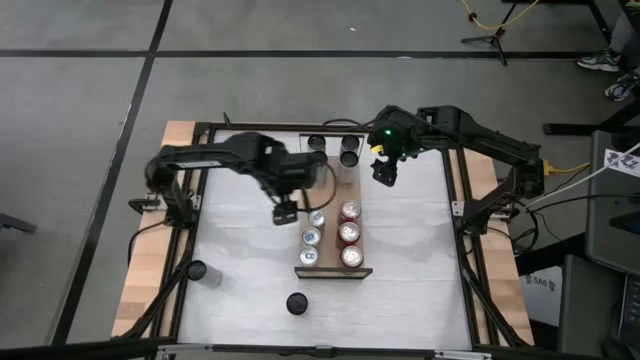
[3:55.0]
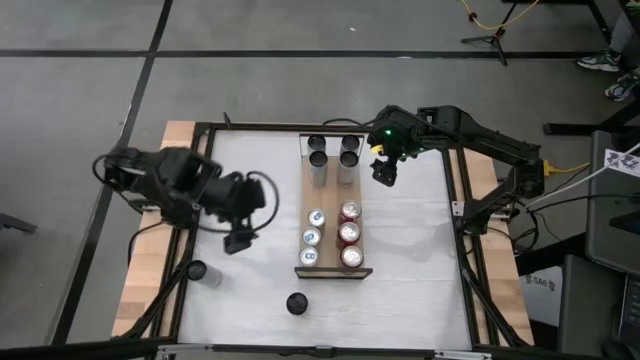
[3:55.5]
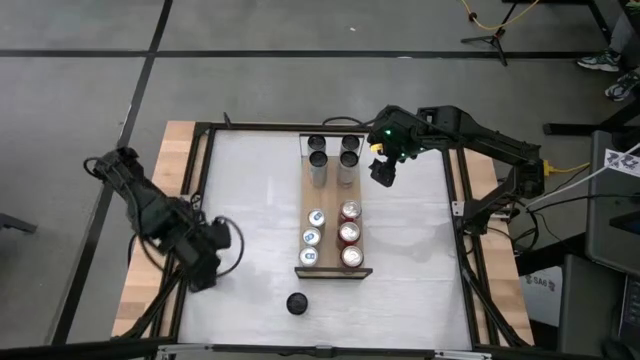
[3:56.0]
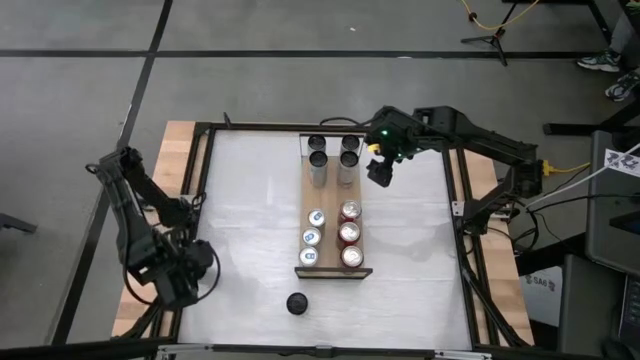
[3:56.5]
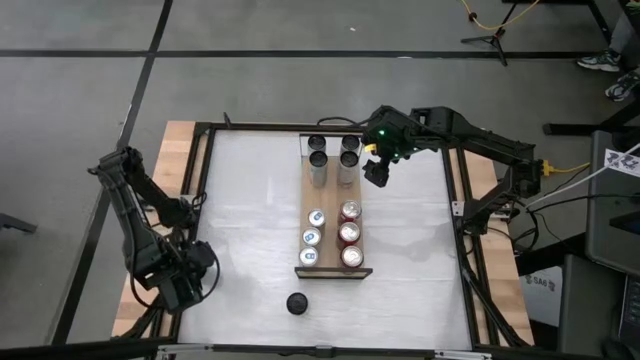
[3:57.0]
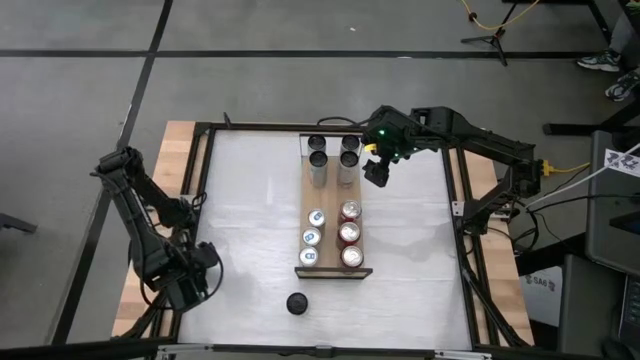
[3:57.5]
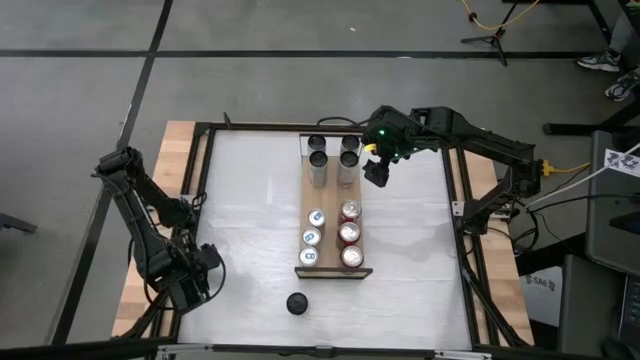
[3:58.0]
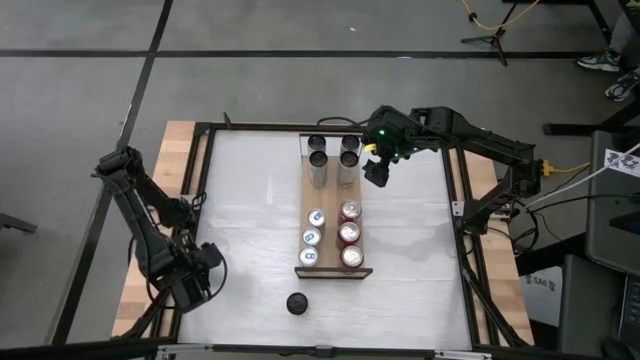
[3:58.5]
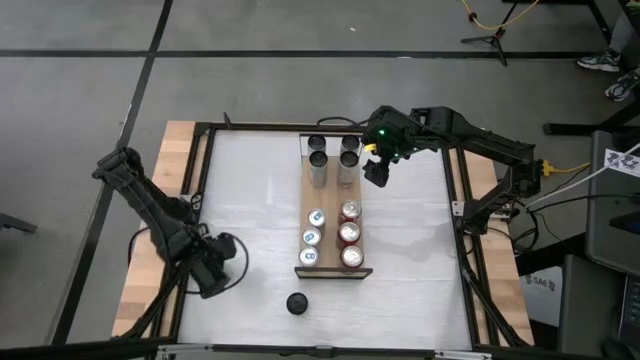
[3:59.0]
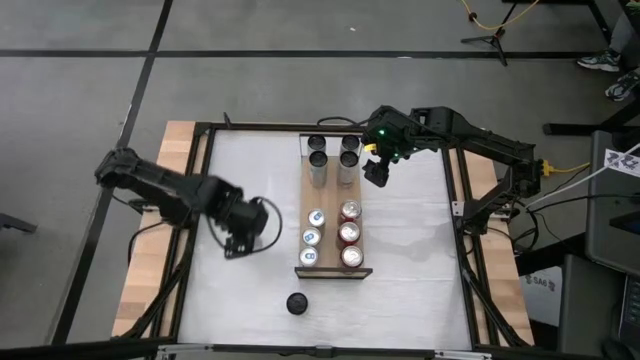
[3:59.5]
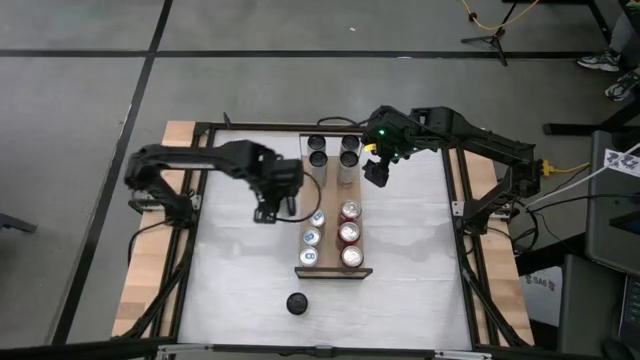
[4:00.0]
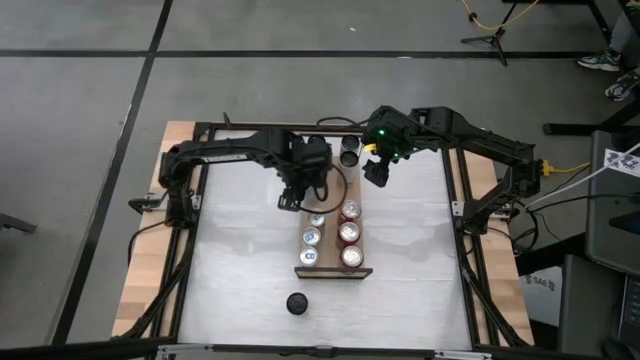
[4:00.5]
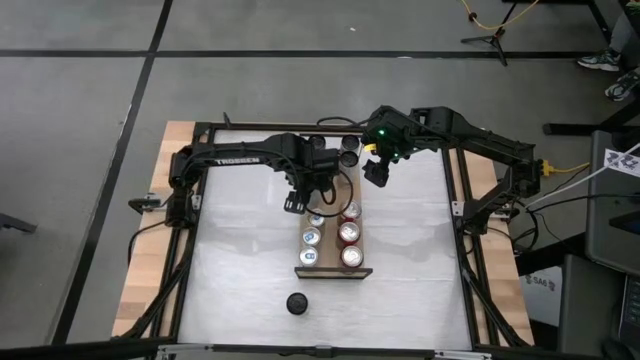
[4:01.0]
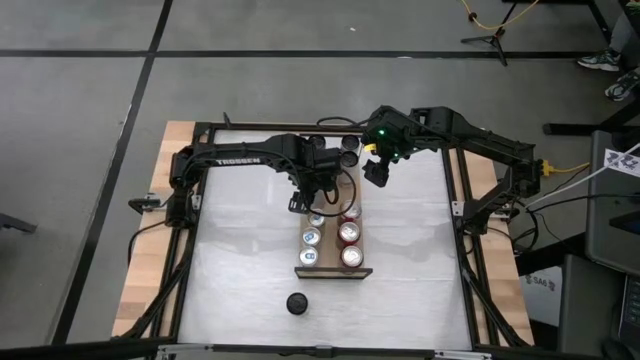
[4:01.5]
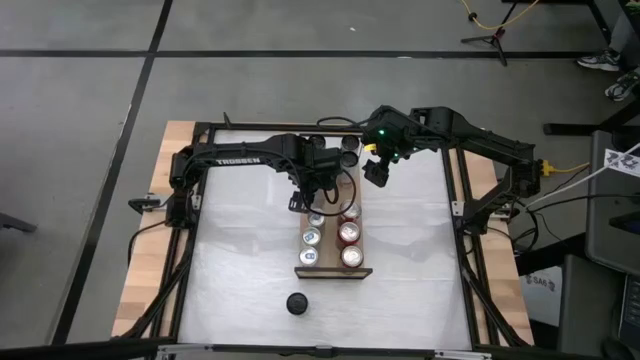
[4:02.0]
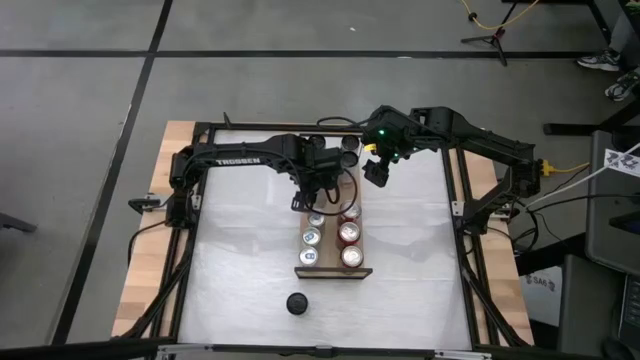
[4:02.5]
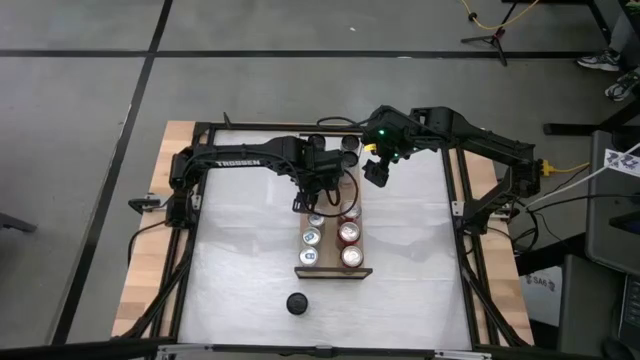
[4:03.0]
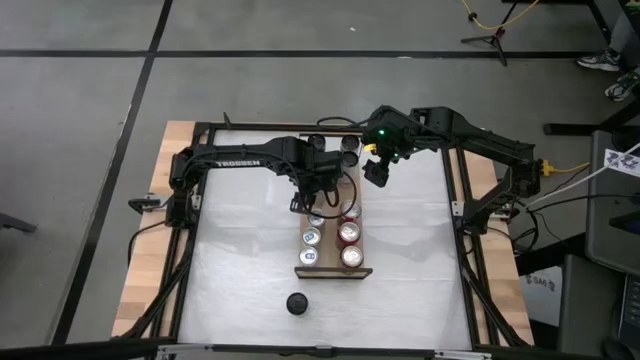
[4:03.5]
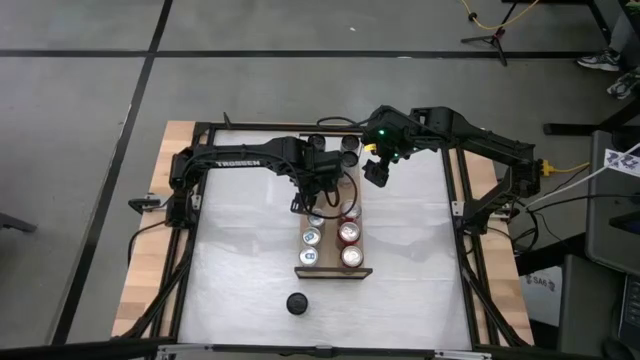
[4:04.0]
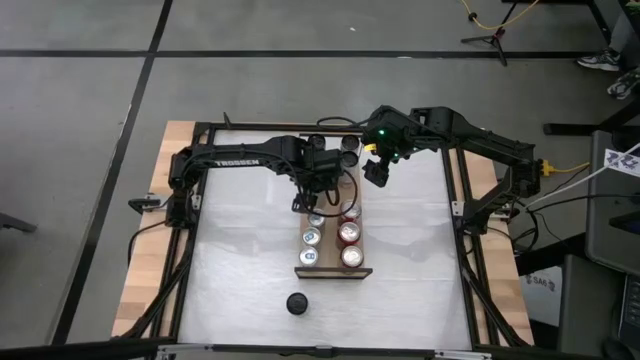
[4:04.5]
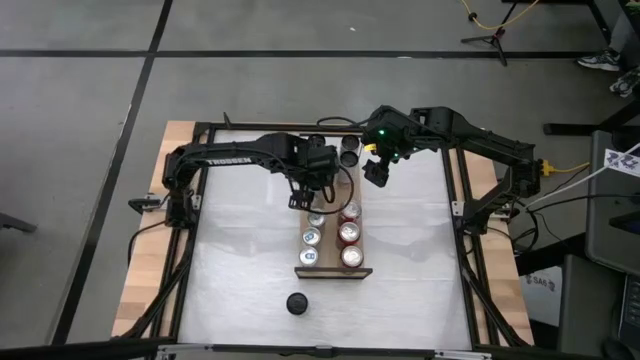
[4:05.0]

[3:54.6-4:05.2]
Task: Place canned beverage on shelf
Put the white pink soda can on the shelf aligned with the other white pink soda can

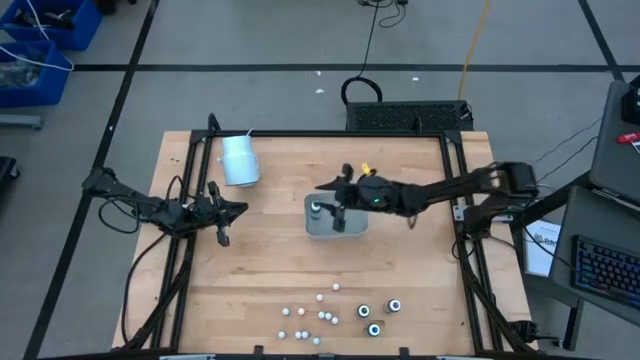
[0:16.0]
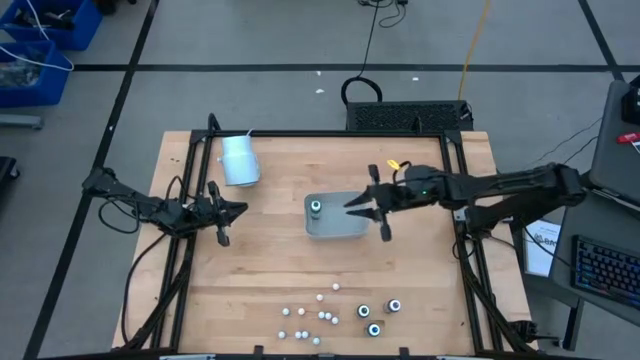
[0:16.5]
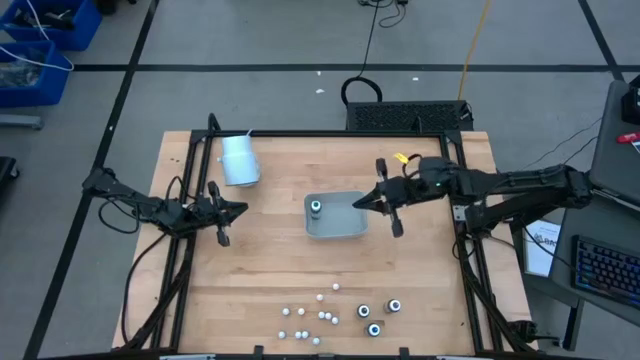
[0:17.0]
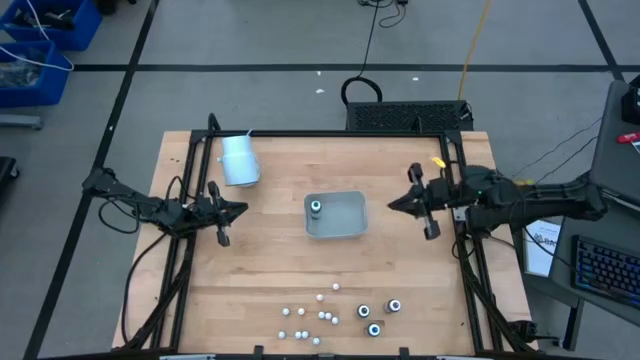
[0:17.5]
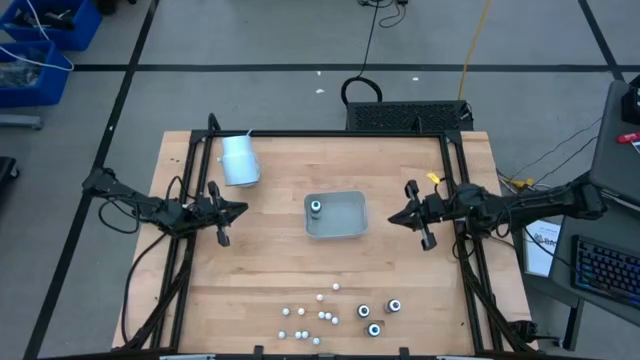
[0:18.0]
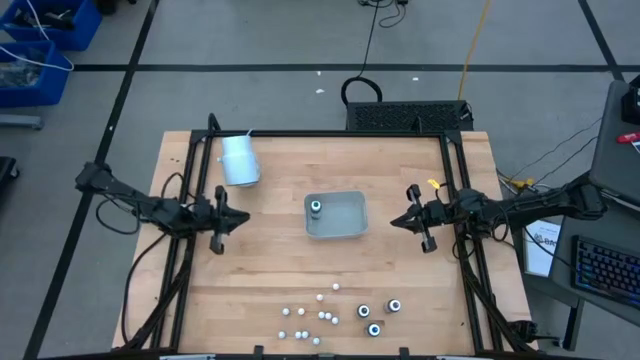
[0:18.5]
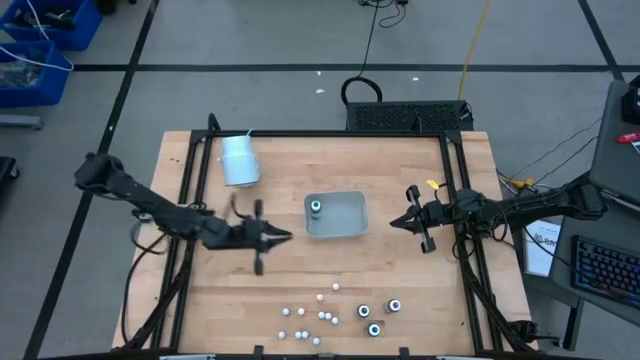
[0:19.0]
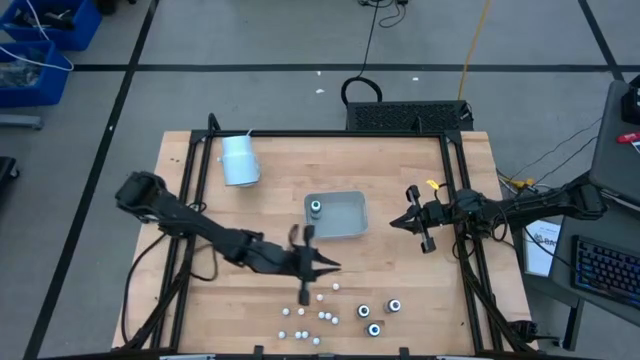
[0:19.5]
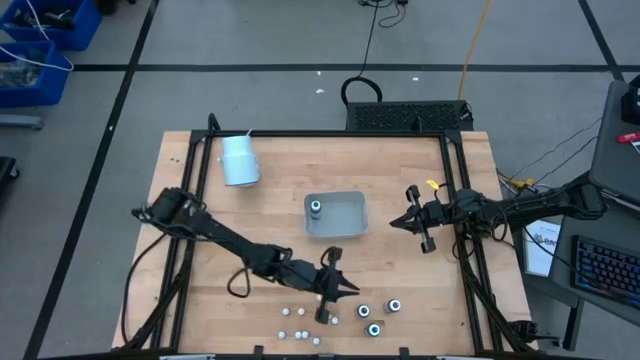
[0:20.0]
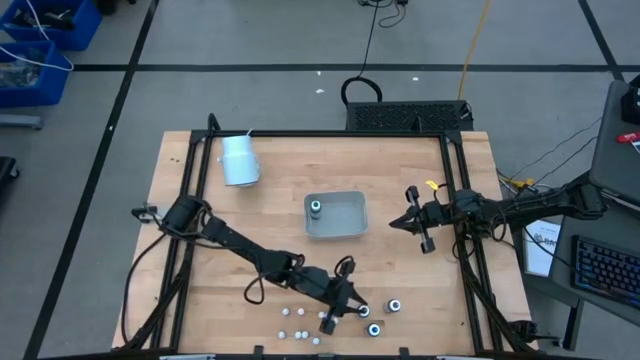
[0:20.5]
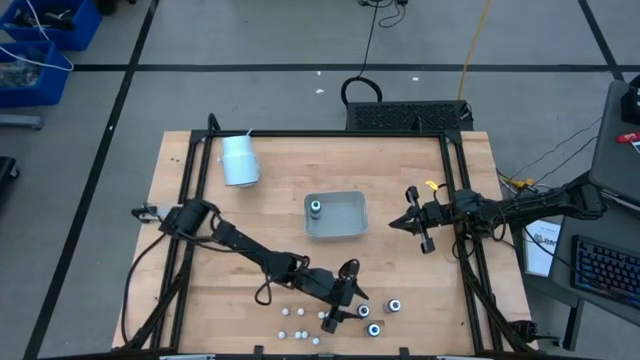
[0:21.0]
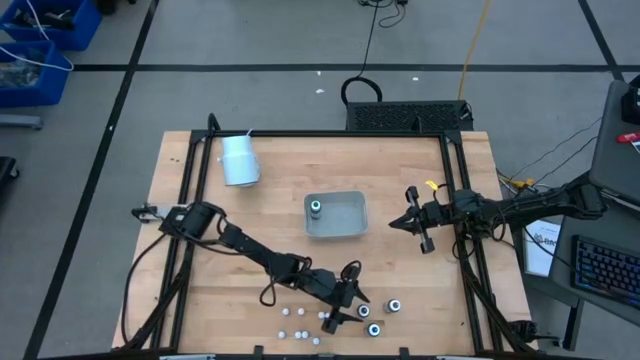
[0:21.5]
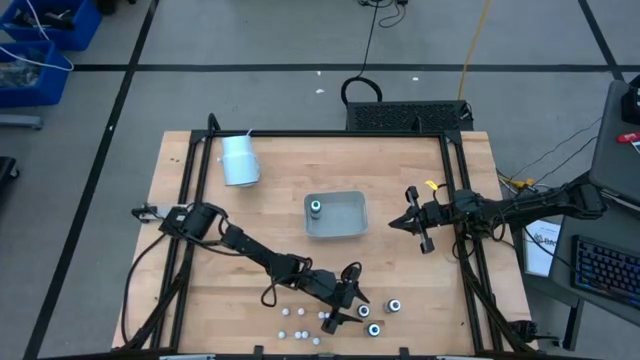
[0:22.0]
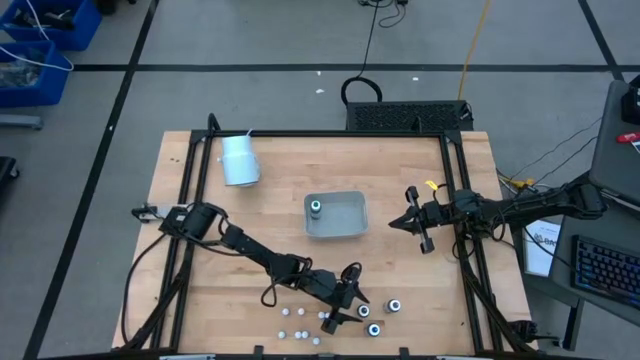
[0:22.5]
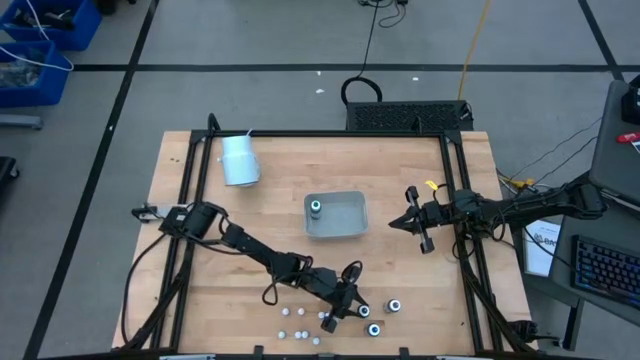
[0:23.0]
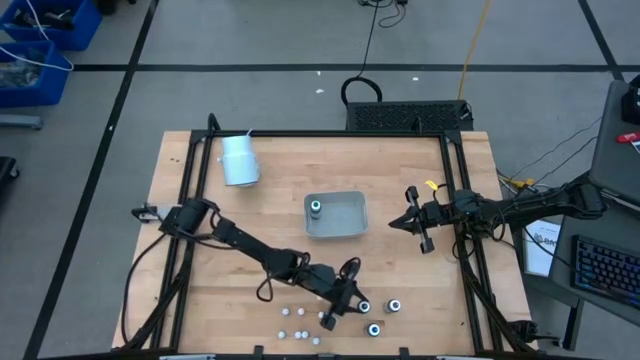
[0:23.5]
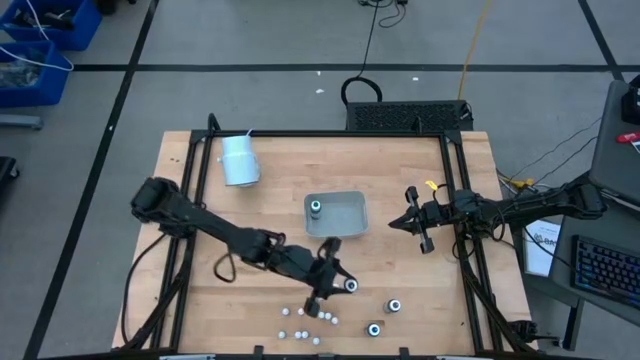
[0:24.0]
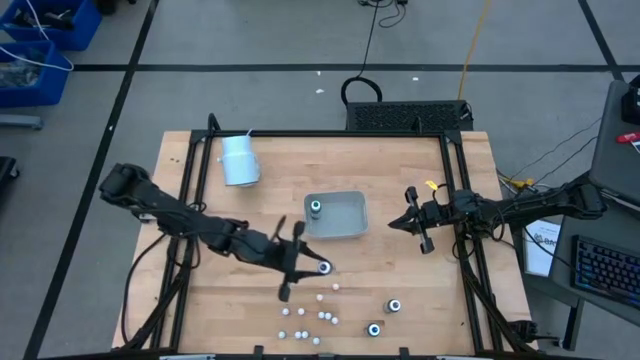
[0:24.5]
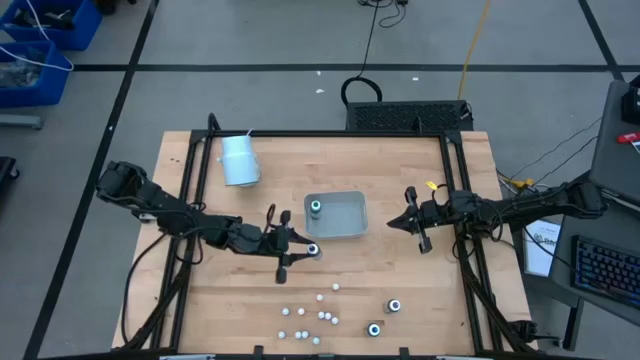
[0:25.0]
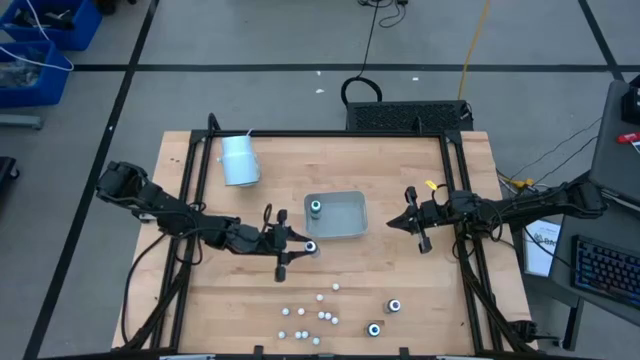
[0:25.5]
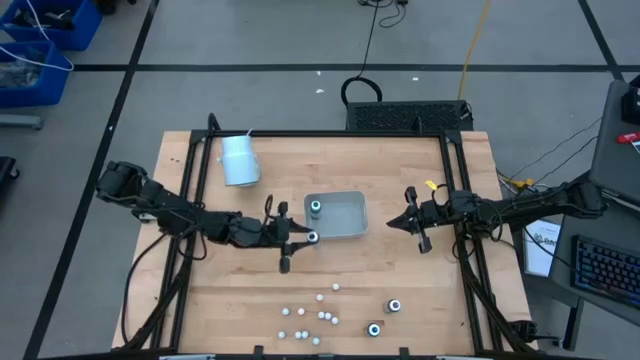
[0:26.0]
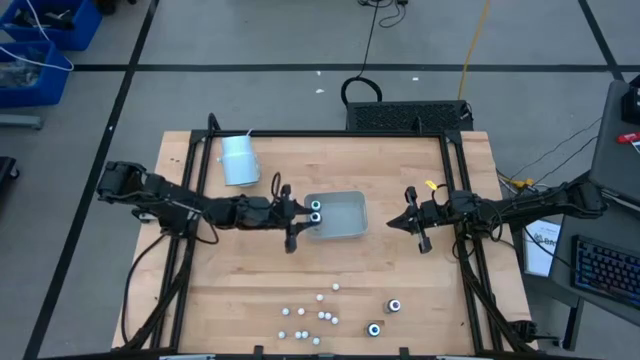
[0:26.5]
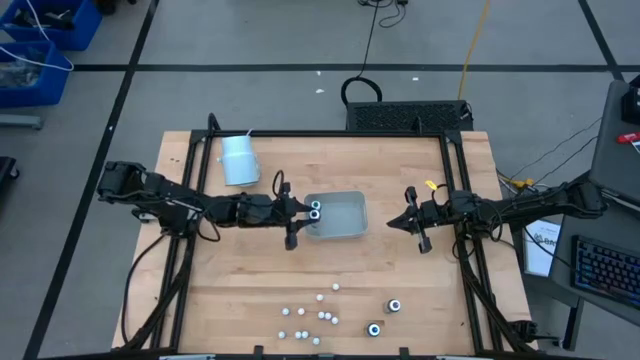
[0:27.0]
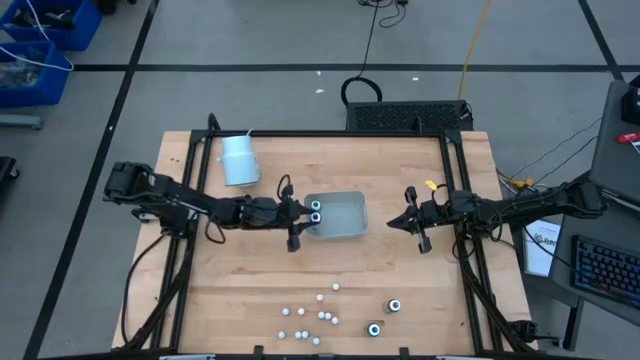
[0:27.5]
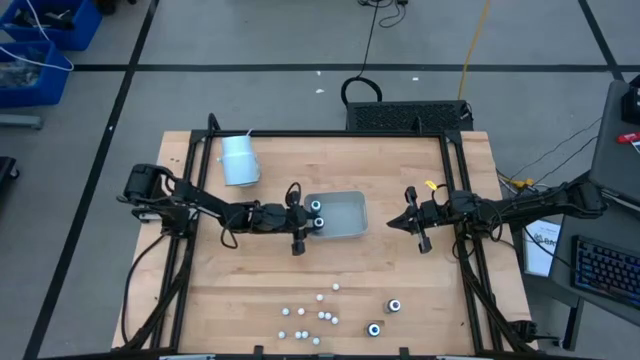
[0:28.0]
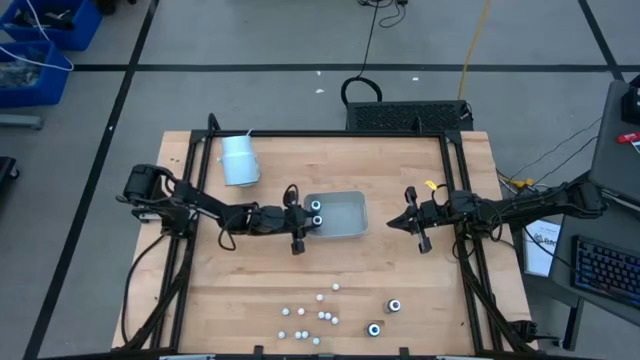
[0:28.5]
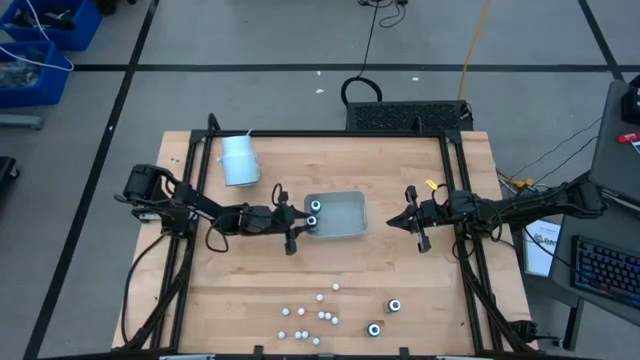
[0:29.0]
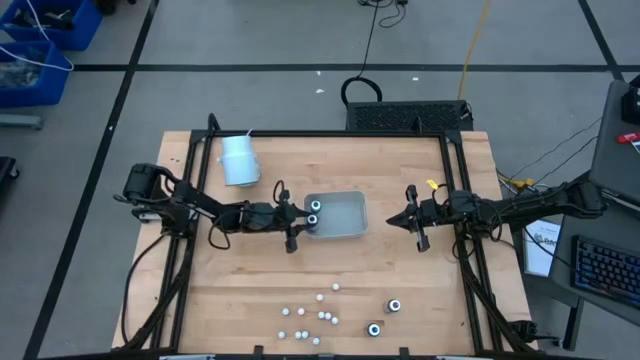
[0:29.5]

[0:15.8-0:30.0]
Task: Pick & Place food coloring
Put the large black food coloring bottle into the bin
